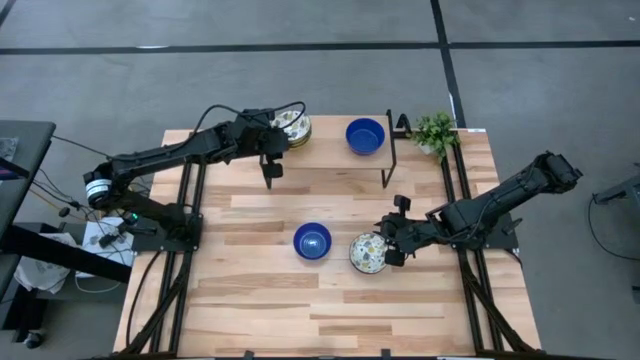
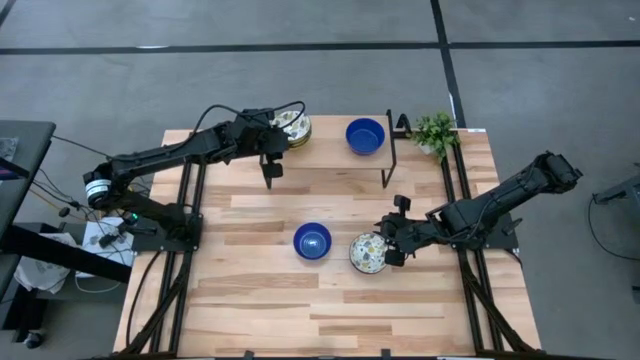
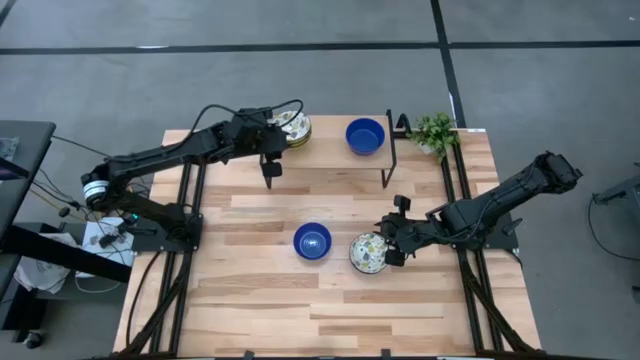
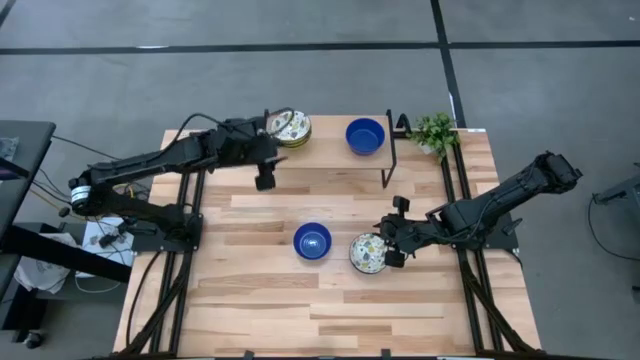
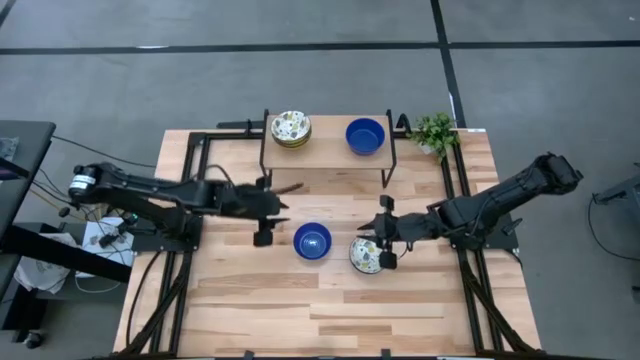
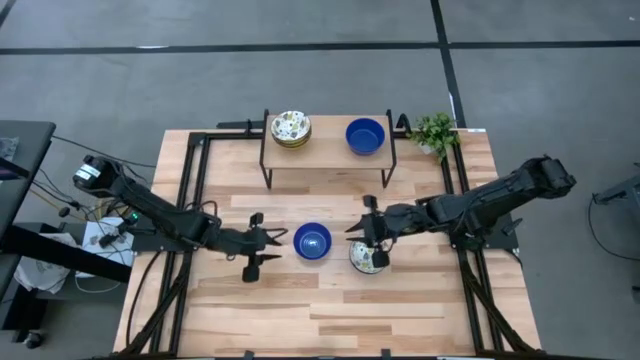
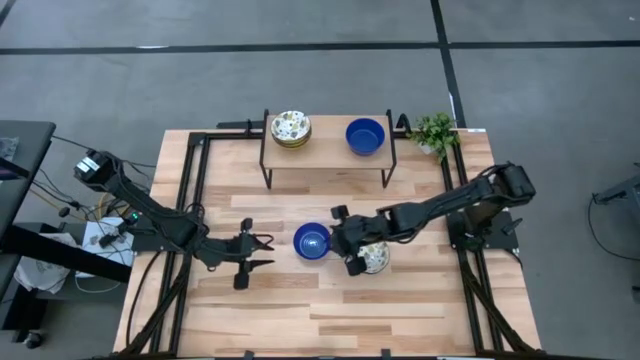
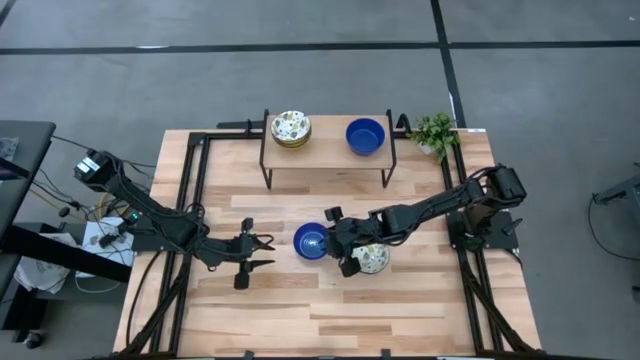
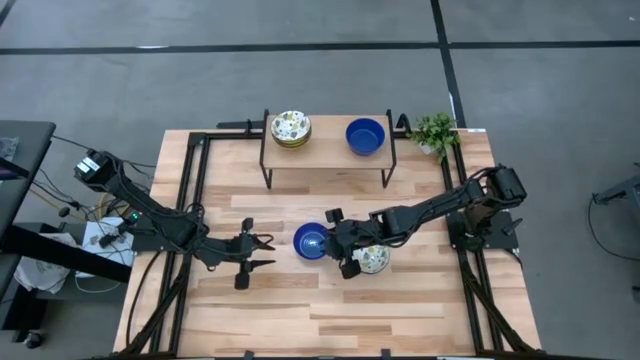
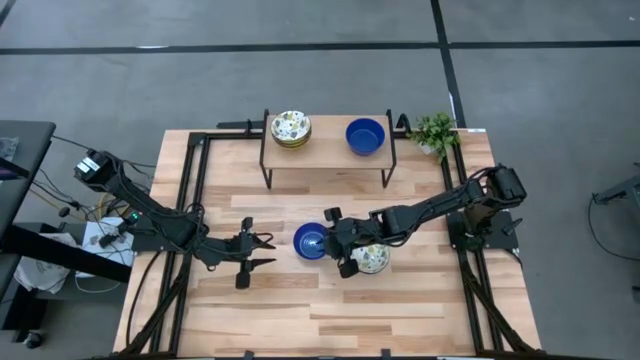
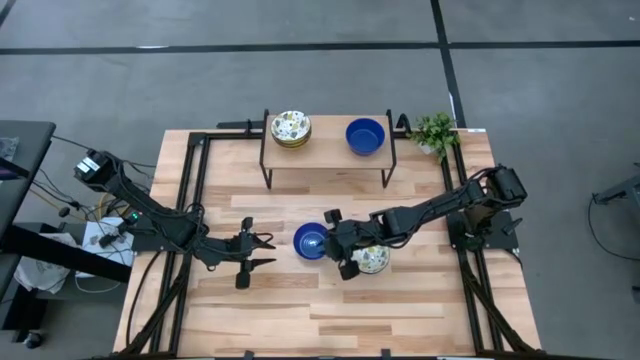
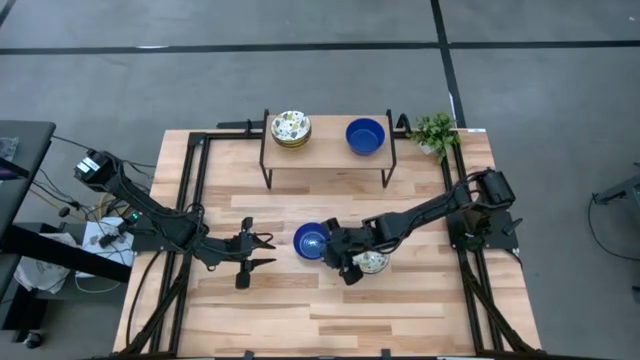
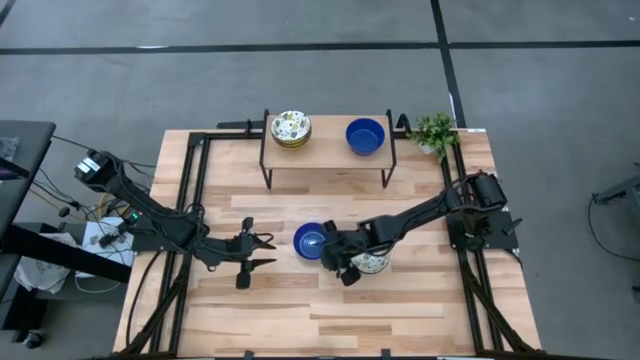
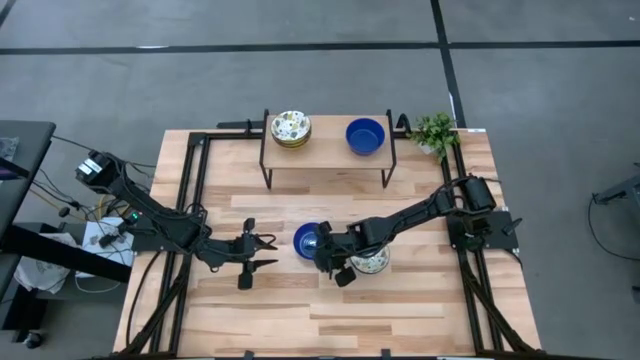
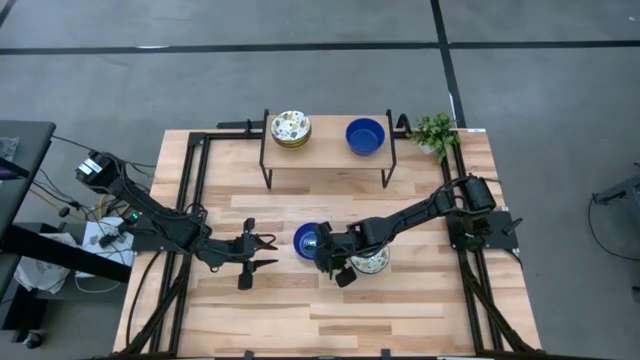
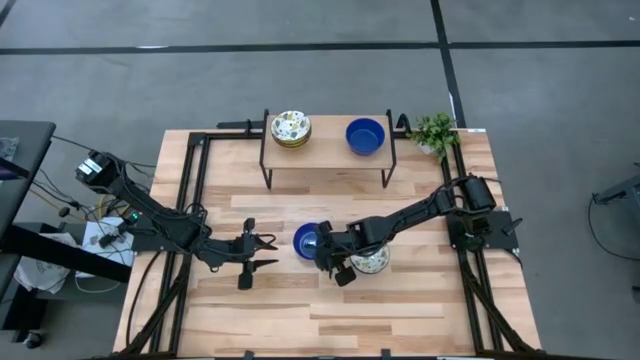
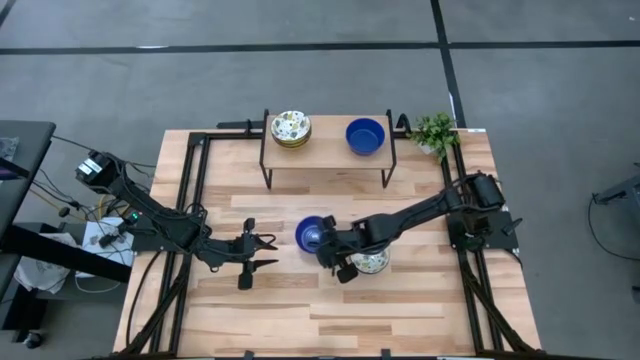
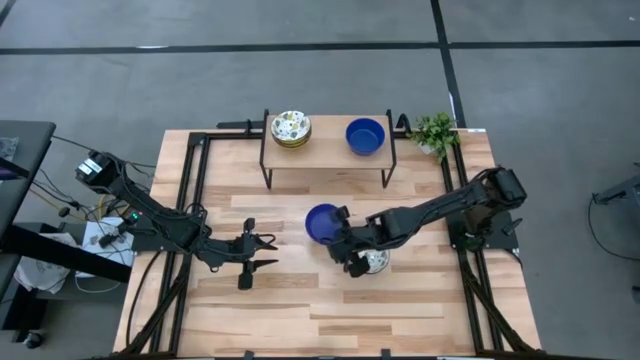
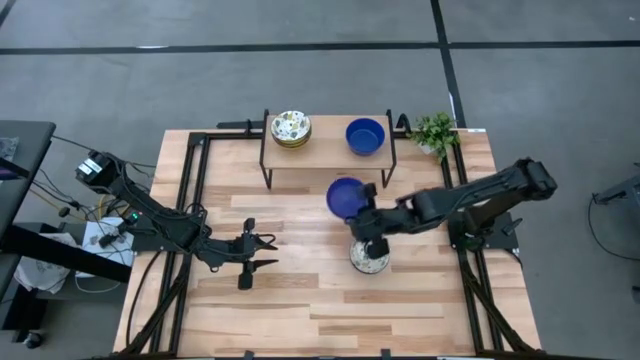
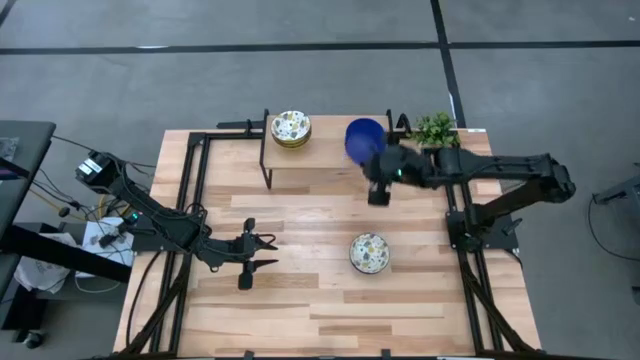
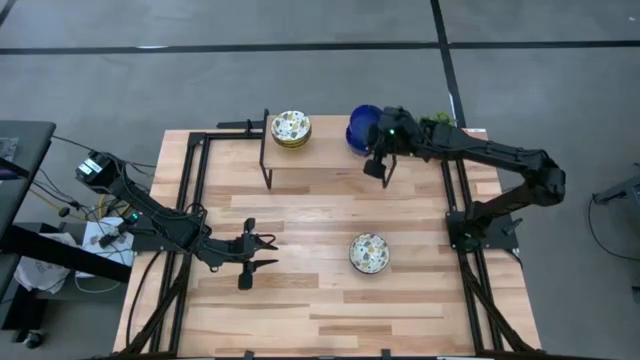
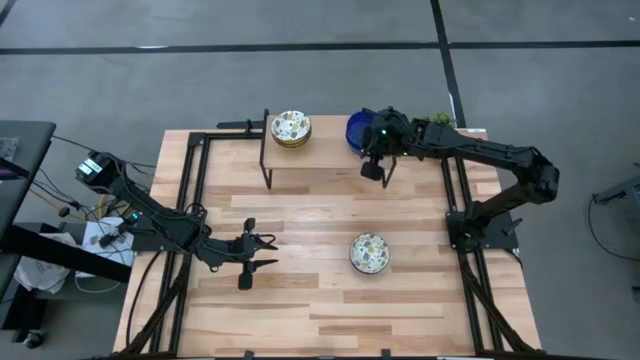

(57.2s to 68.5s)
Task: Pick & Place Mini bowls
Stack the blue bowl on top of the blue bowl on the shelf

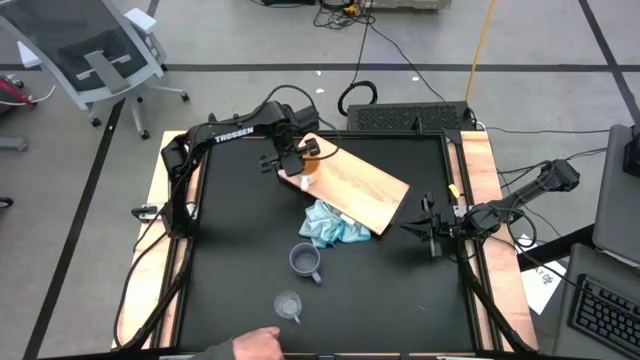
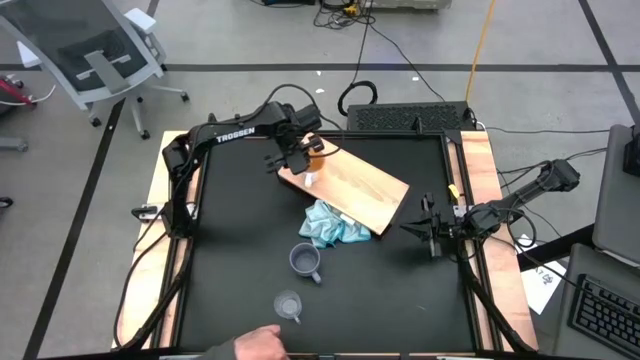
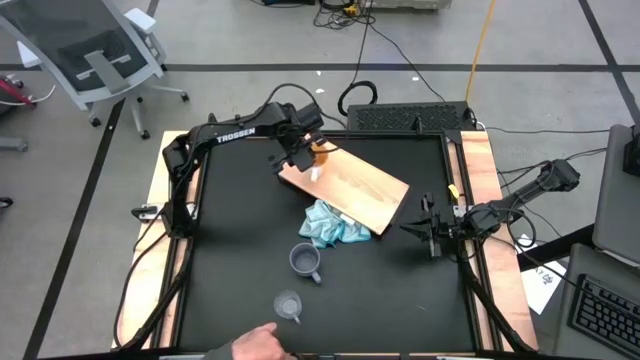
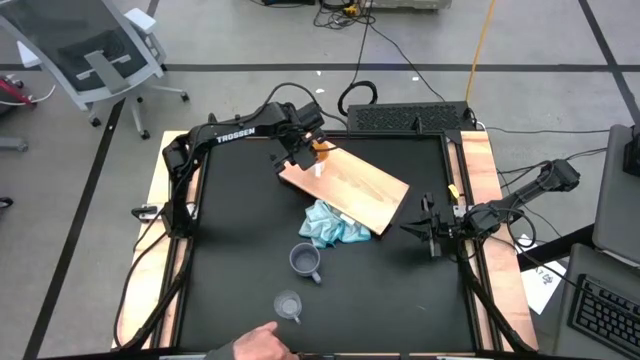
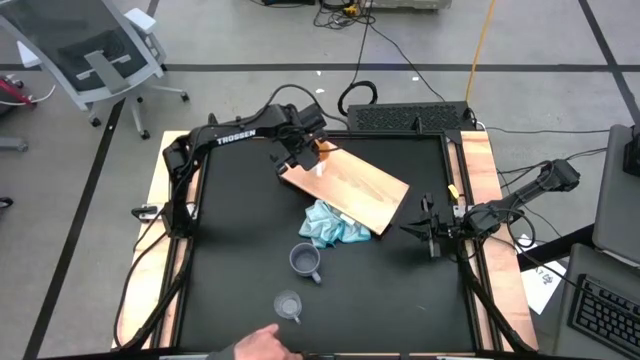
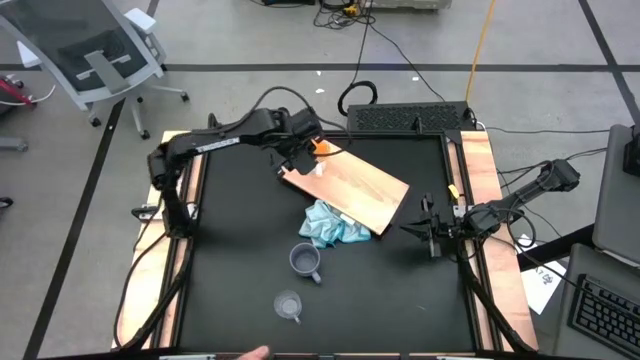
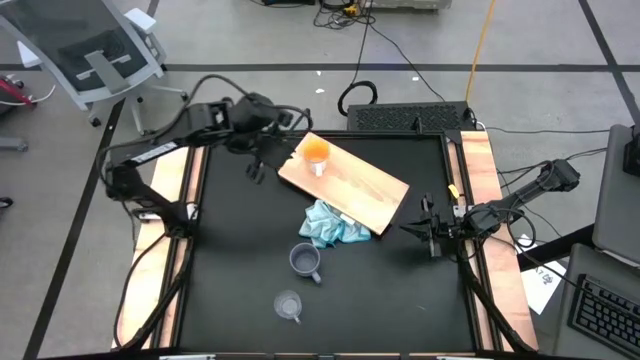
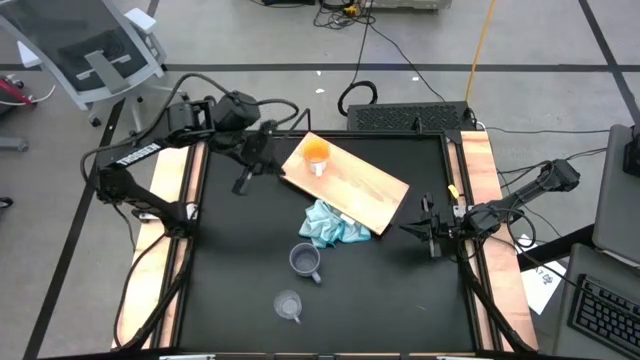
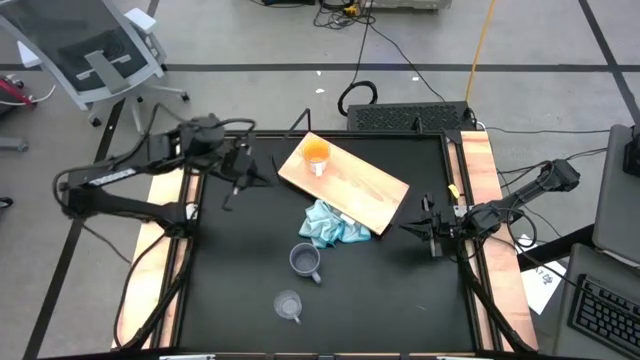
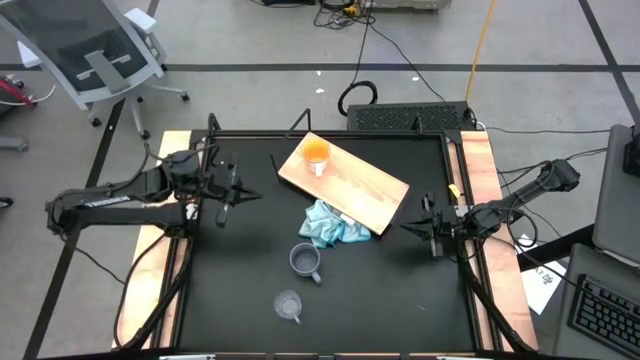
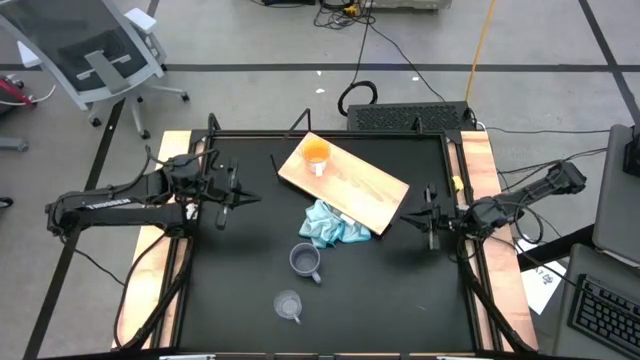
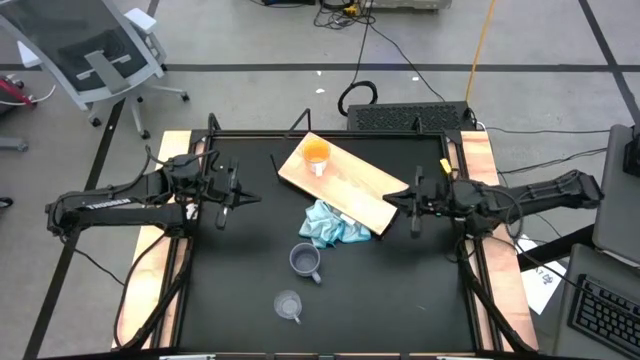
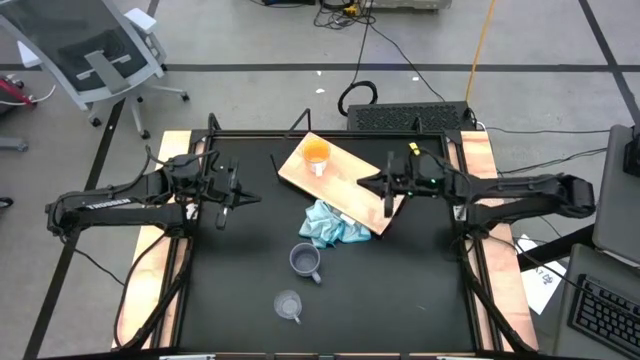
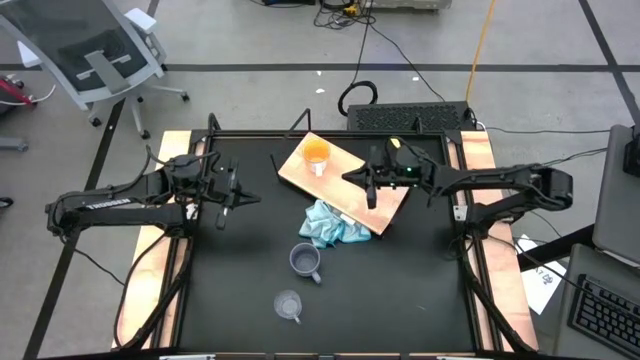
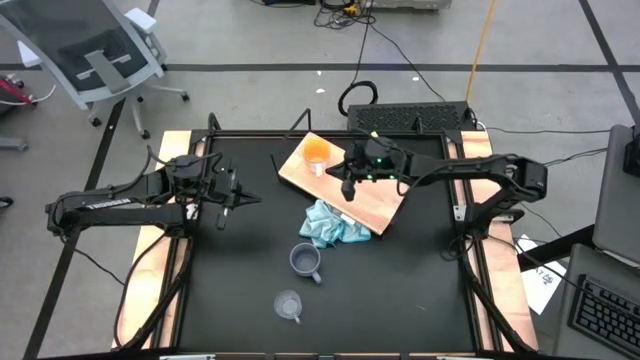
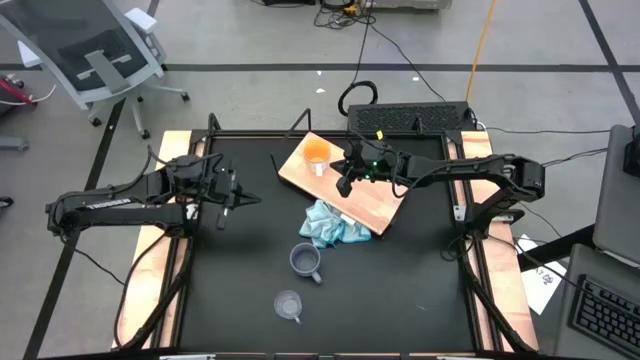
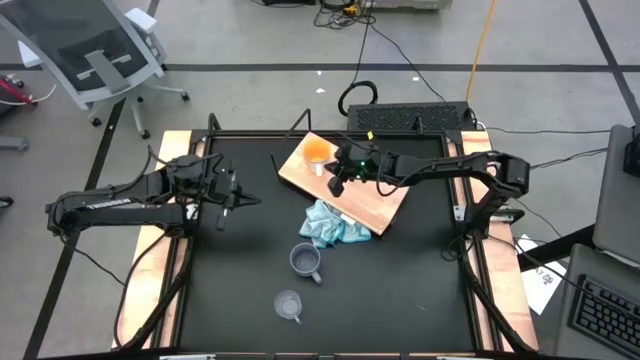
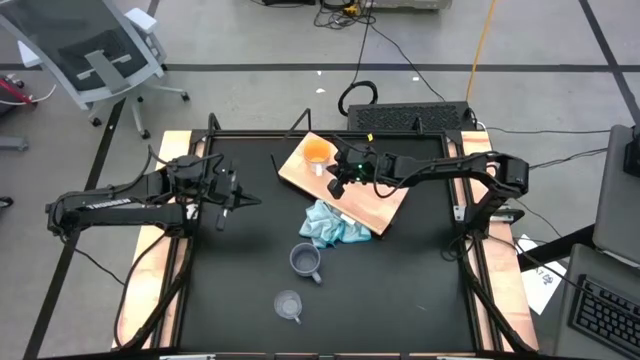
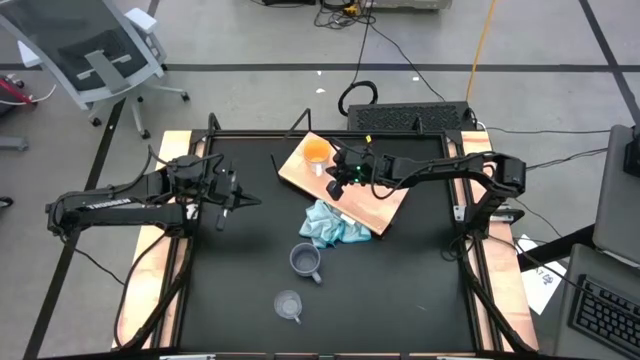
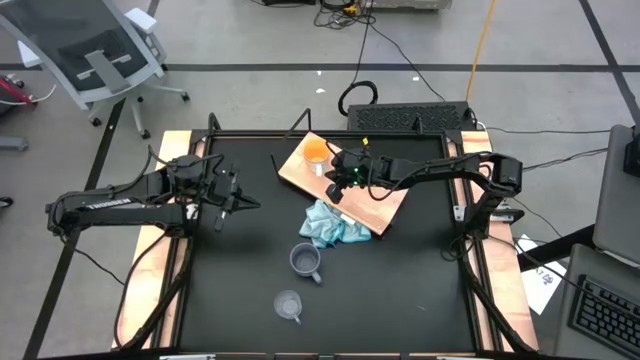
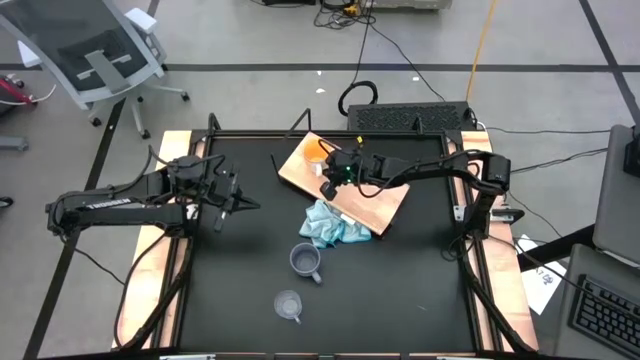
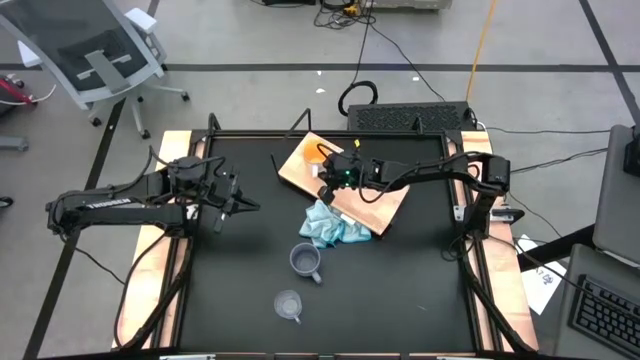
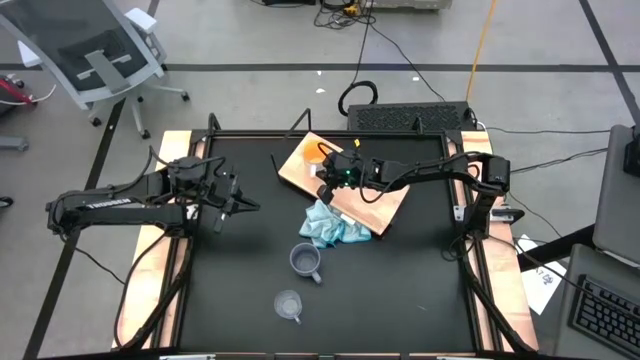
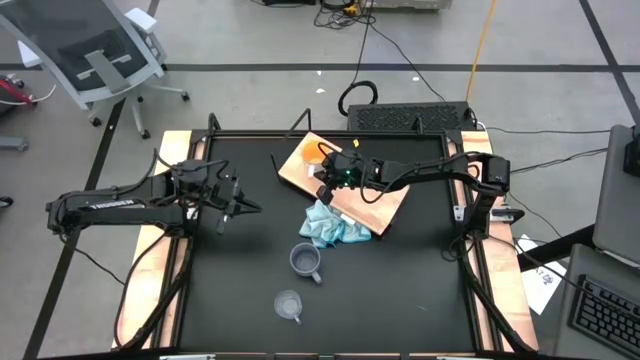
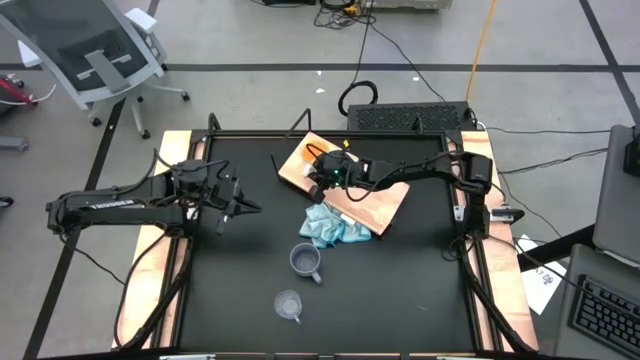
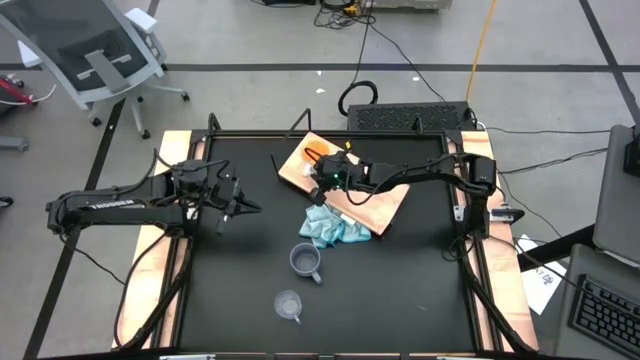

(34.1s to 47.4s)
Task: Stack small to large cups/mugs on shelf
Adjust the position of the orange mug
